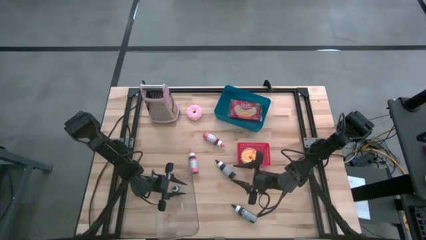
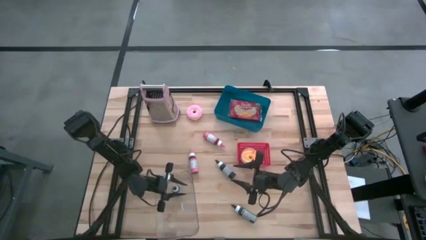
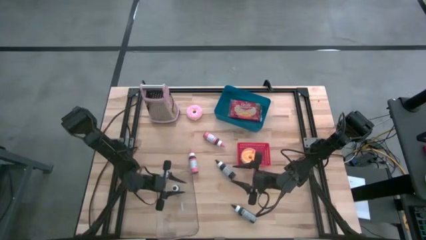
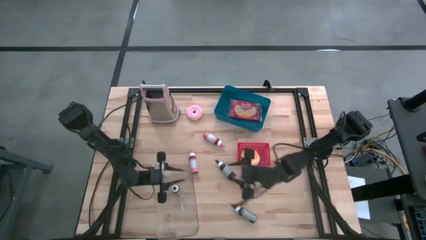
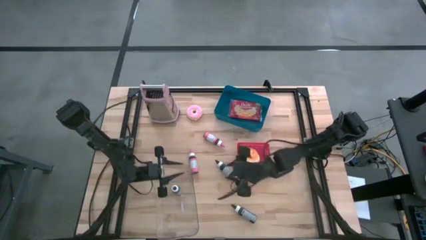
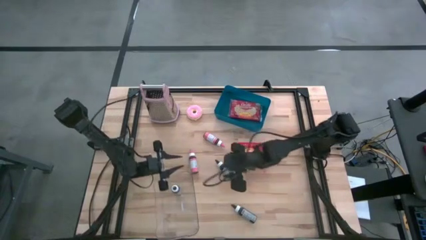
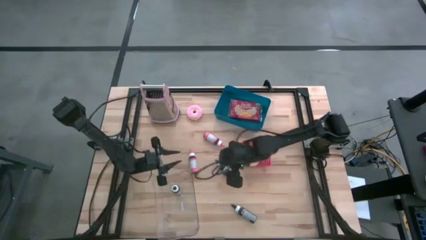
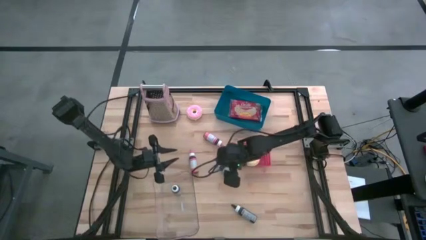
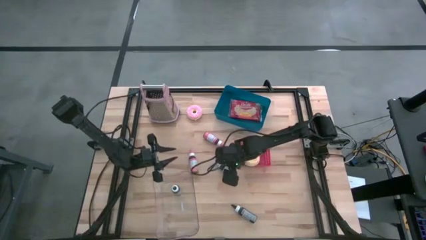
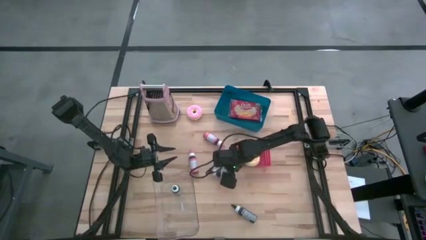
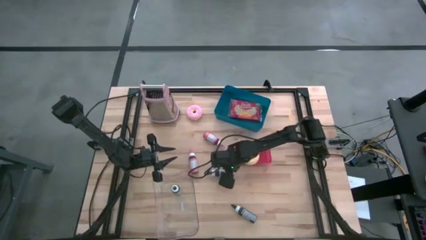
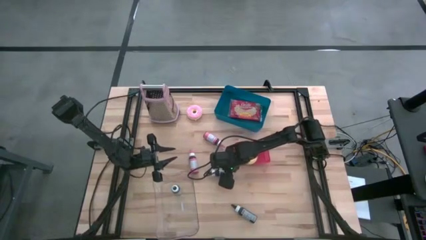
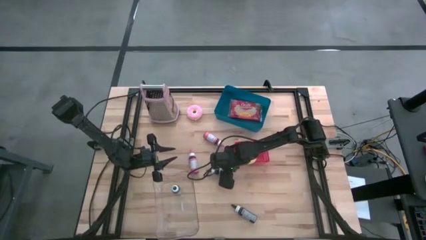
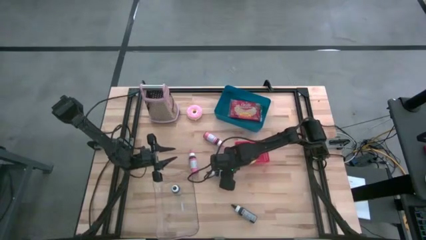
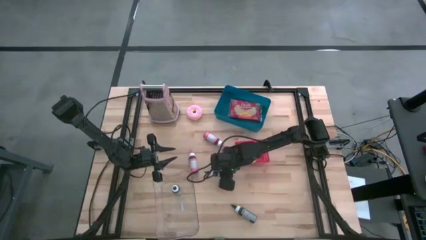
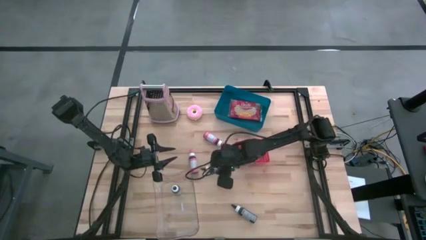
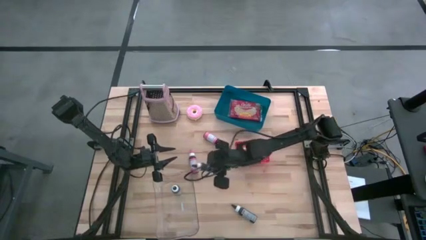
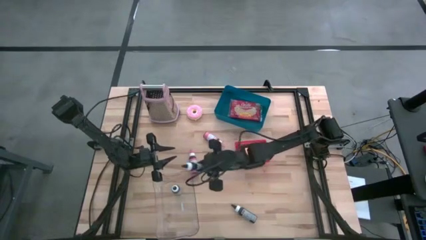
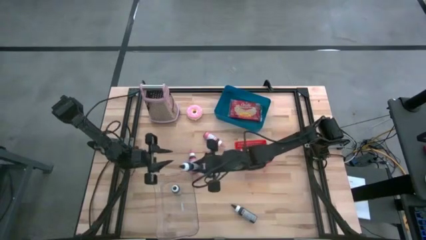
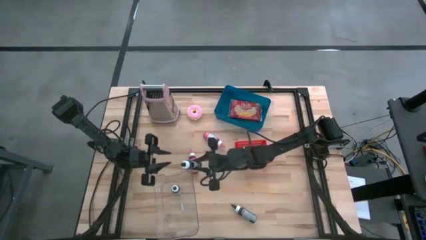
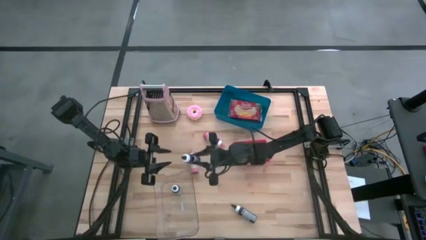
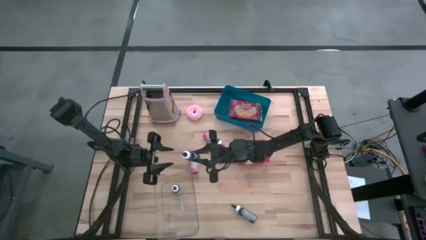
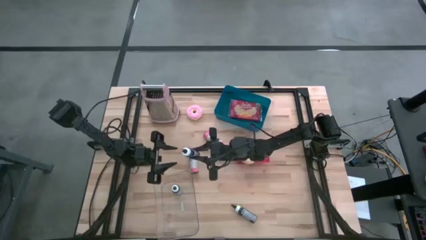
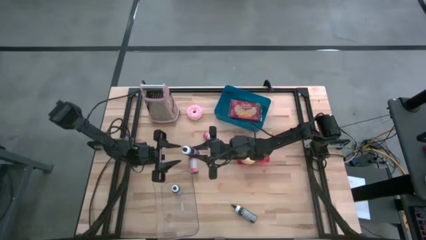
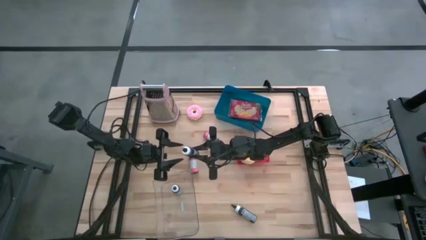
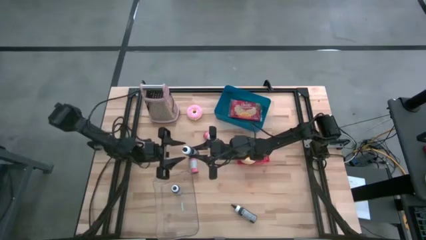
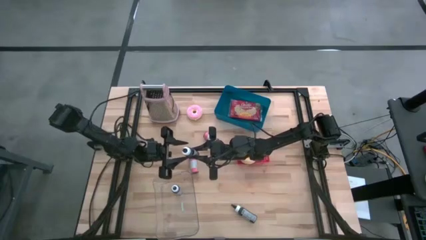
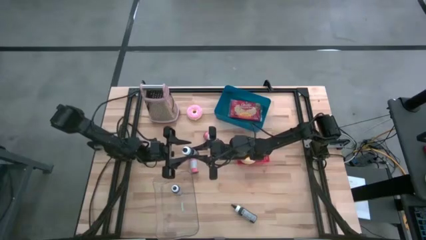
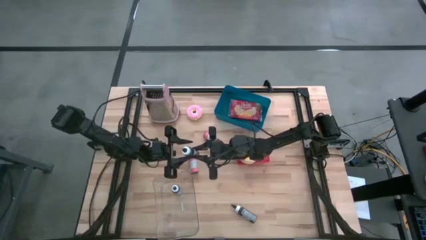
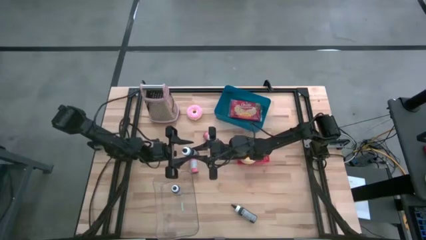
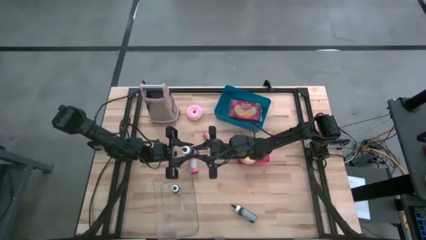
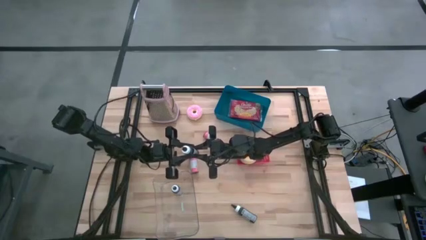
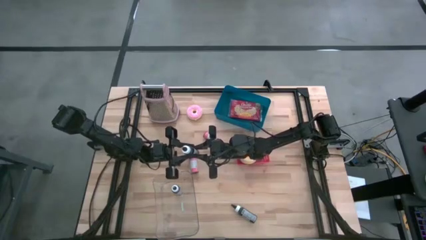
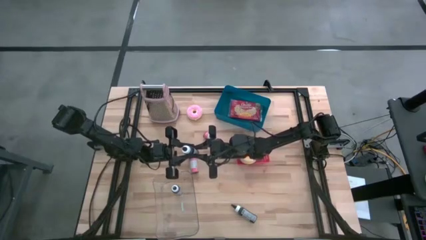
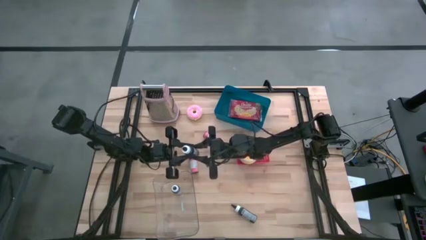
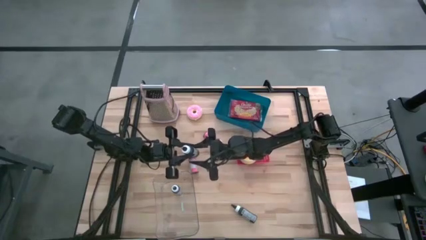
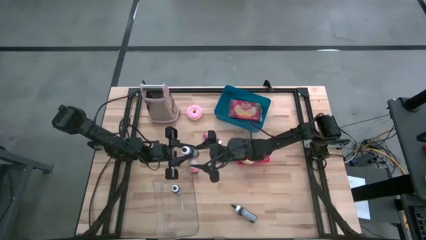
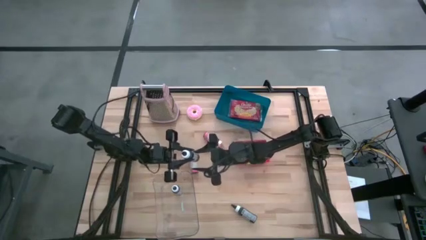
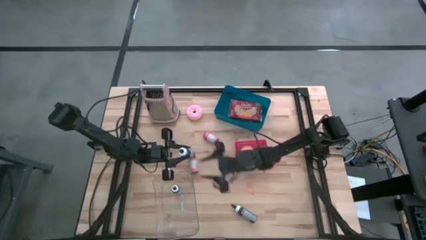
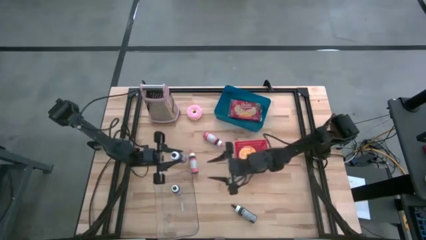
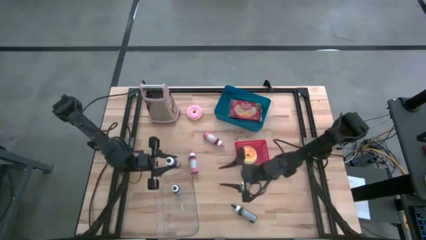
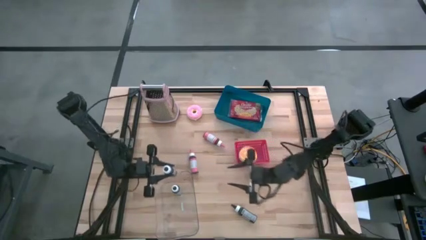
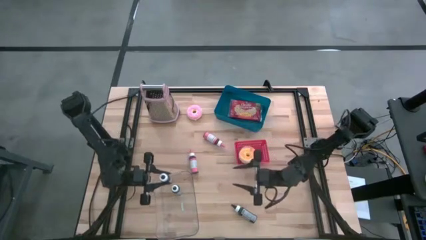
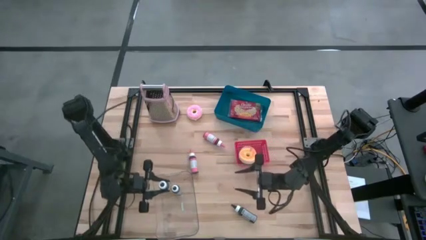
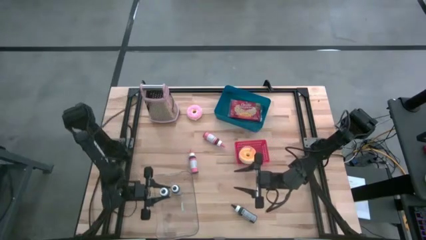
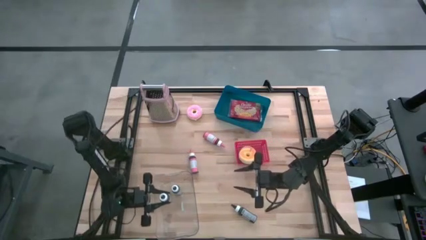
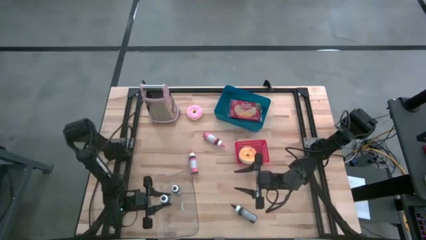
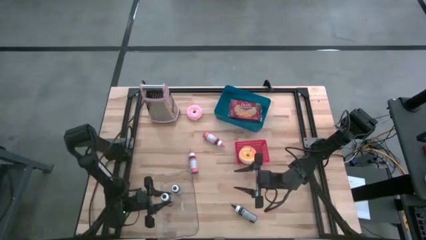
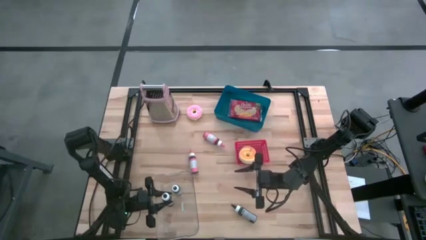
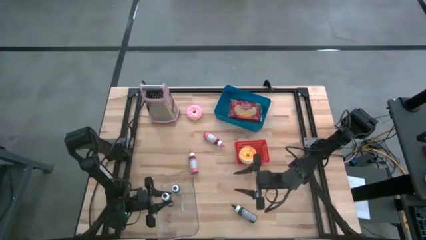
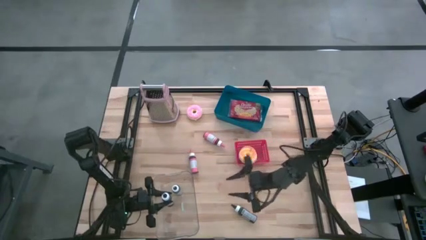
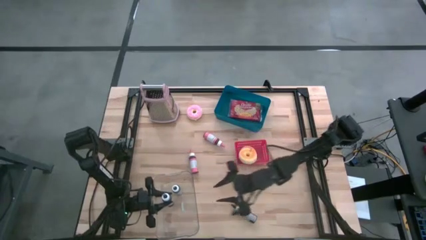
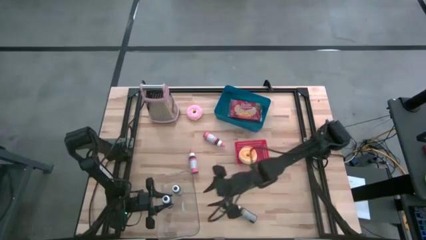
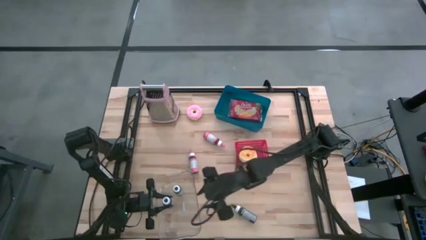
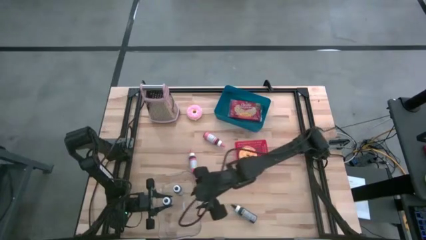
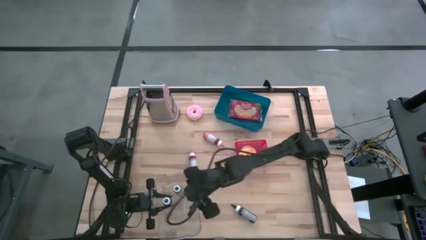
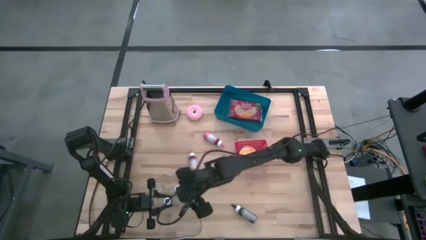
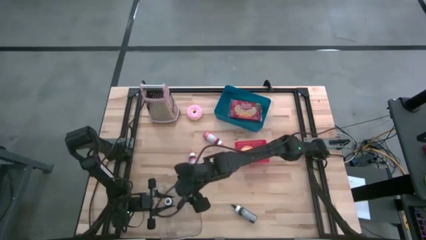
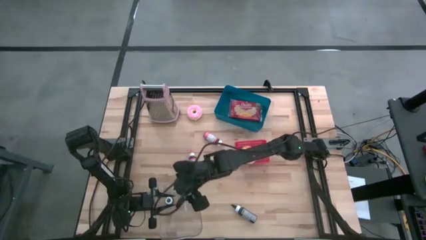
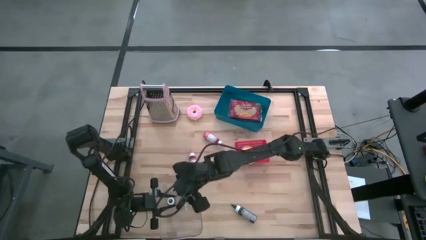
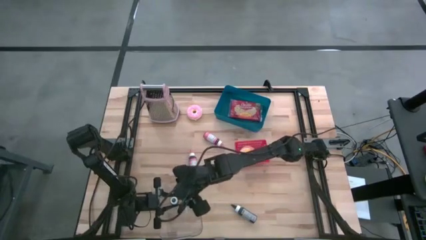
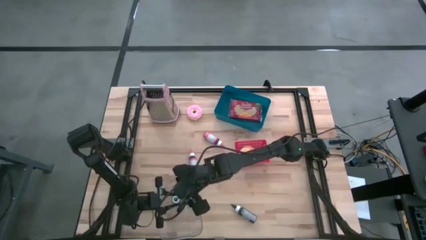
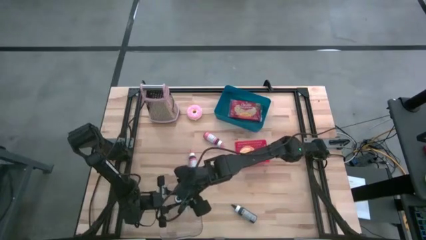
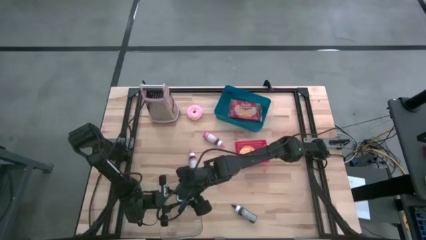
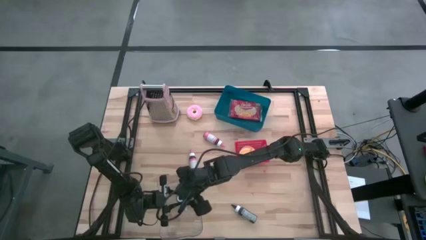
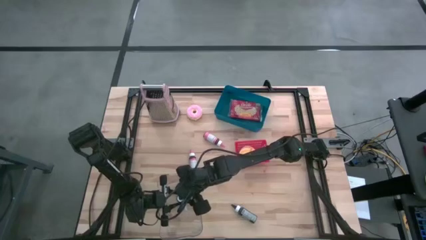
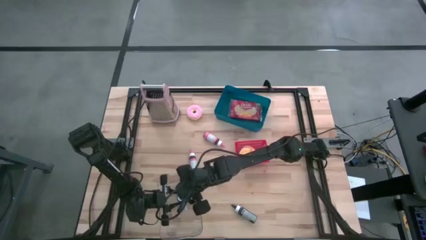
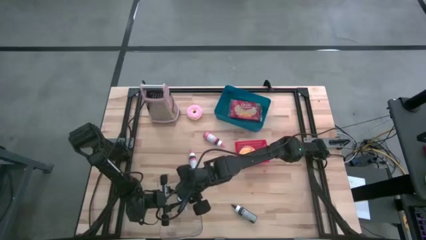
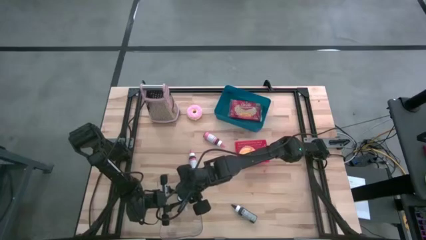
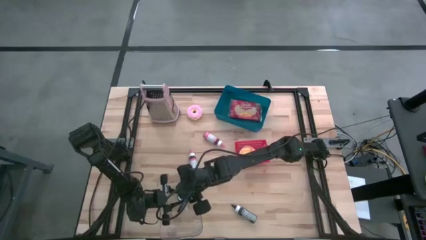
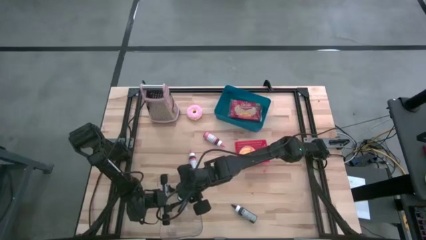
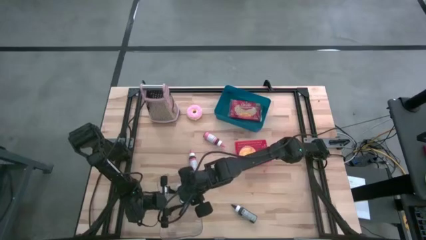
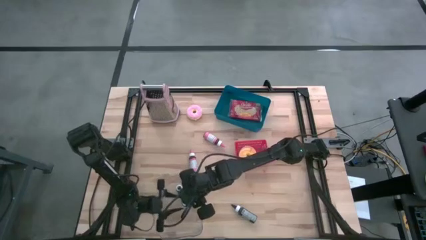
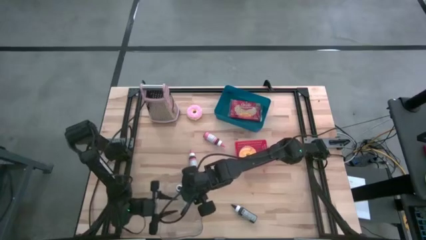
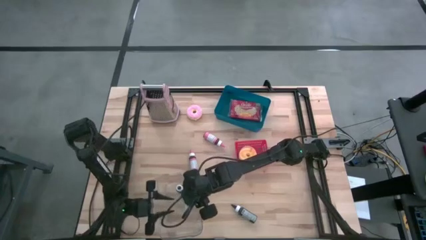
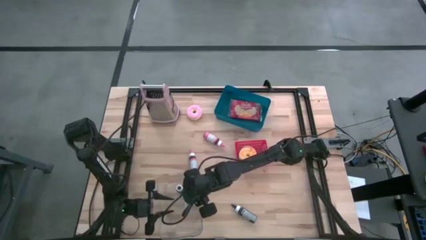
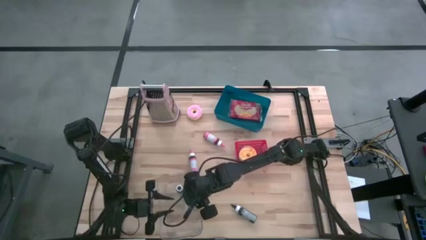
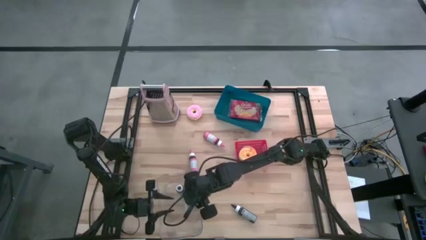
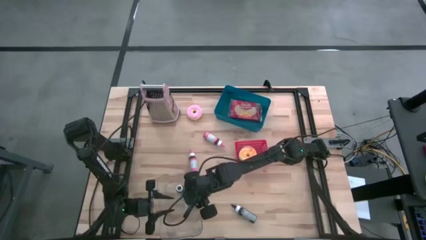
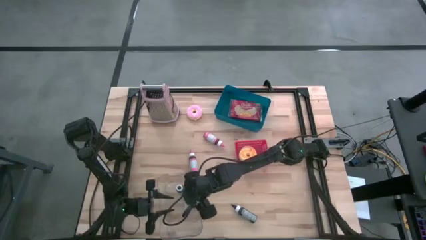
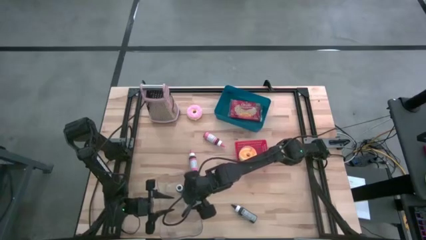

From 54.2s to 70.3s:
Task: Pick & Place Food Item
Put the top black food coloring bottle into the transparent bin
